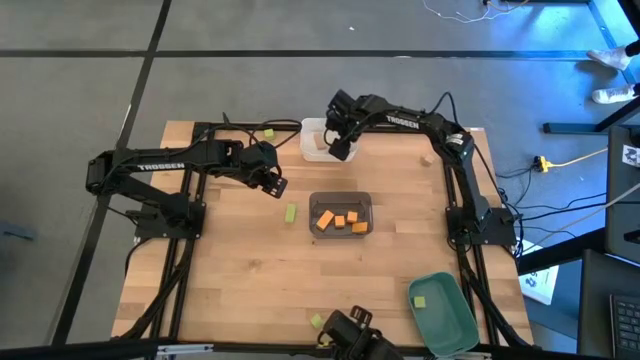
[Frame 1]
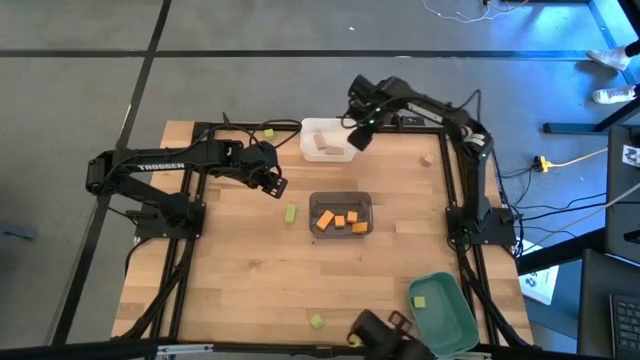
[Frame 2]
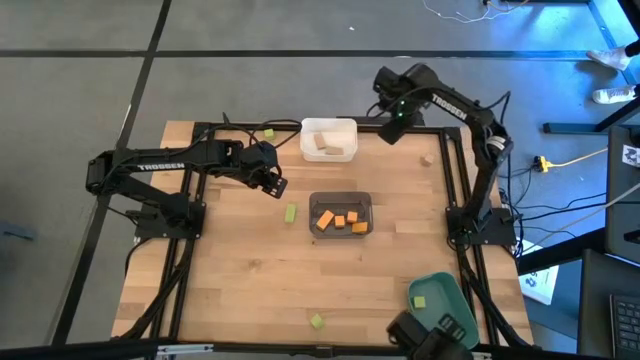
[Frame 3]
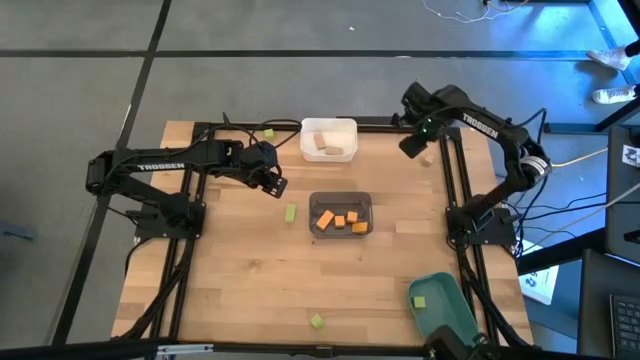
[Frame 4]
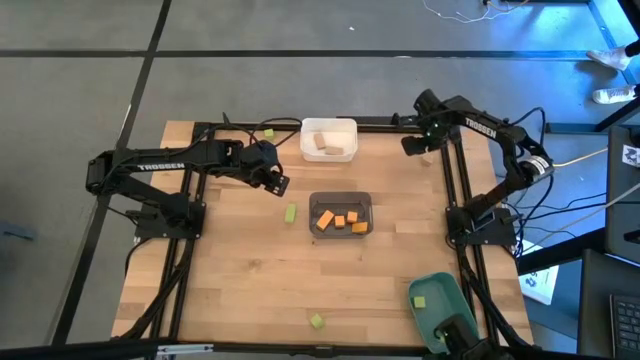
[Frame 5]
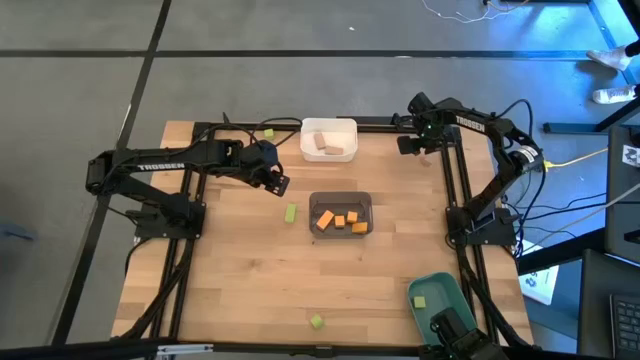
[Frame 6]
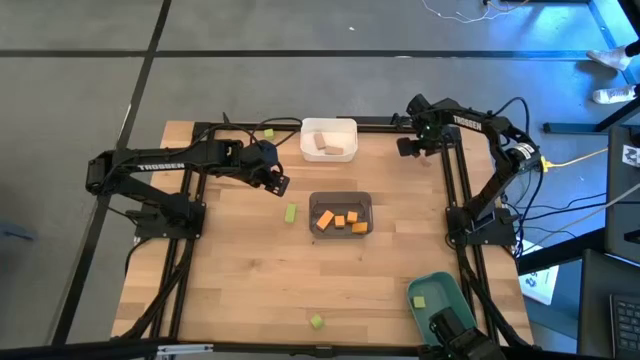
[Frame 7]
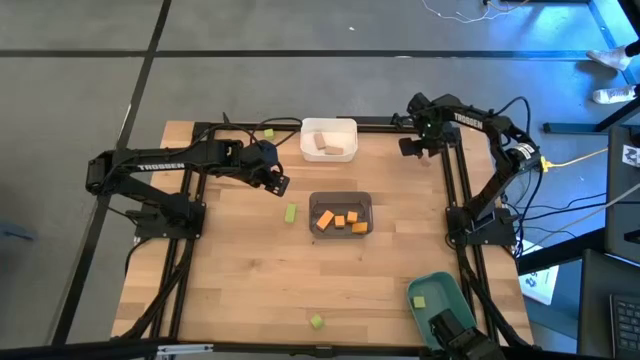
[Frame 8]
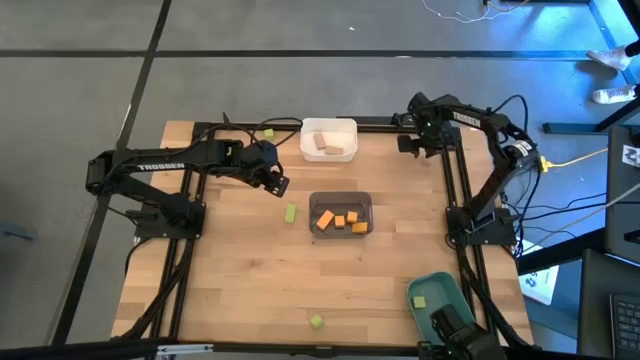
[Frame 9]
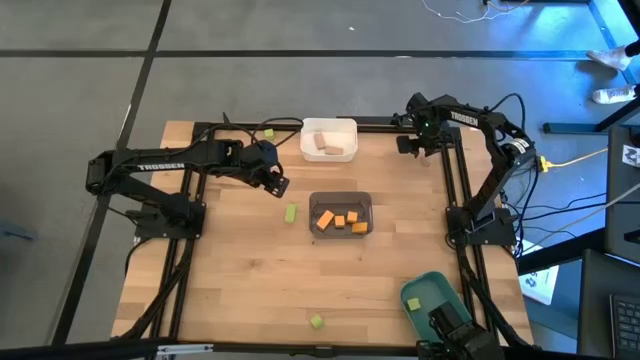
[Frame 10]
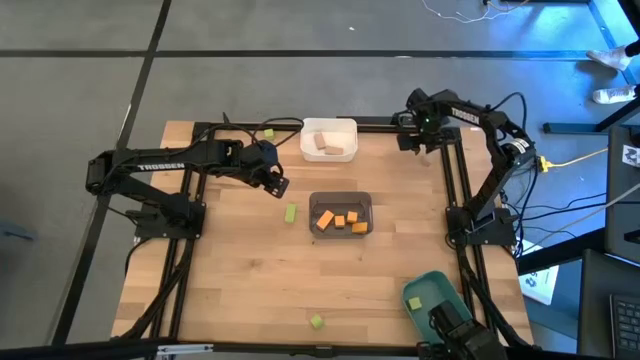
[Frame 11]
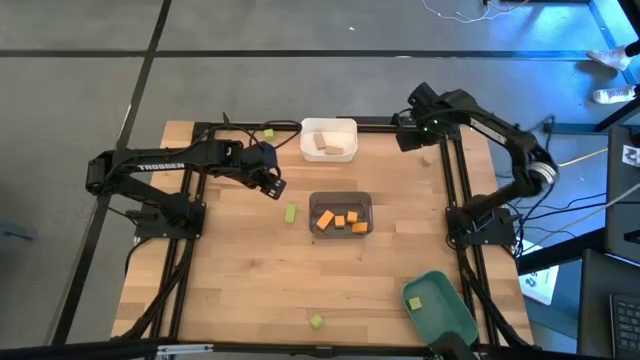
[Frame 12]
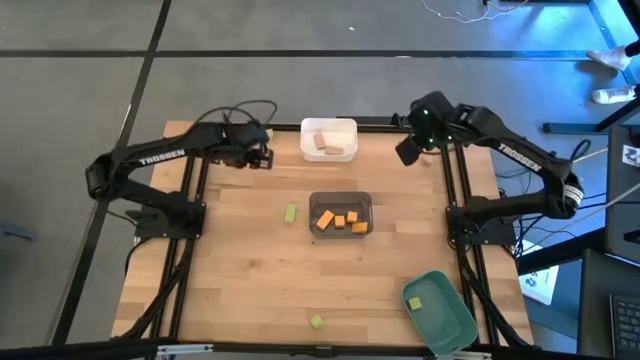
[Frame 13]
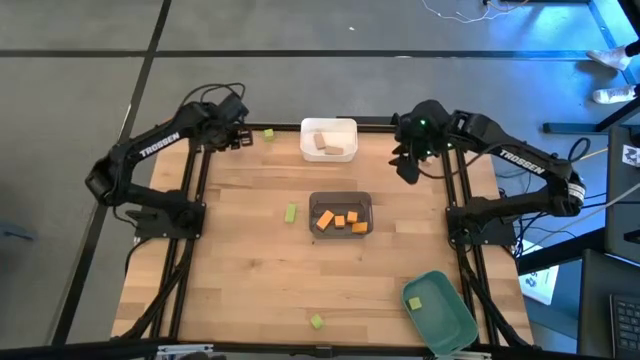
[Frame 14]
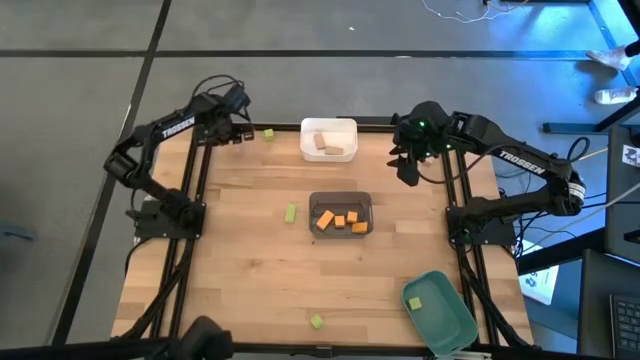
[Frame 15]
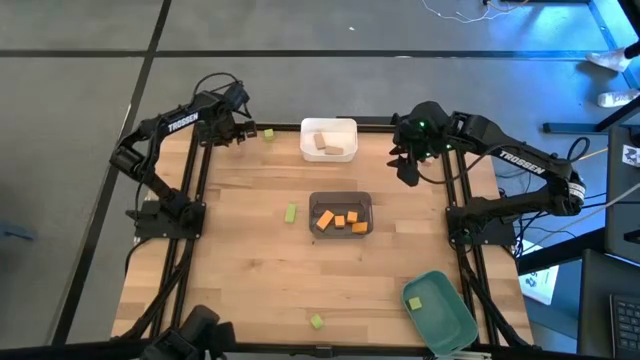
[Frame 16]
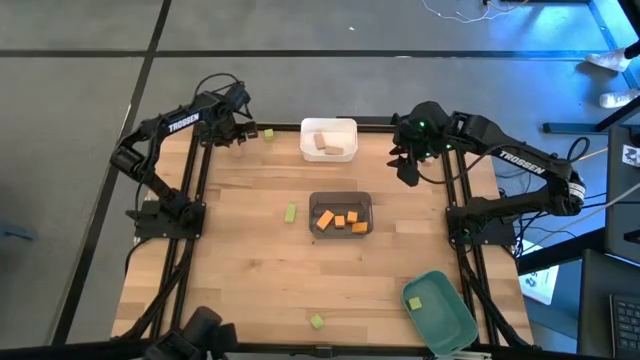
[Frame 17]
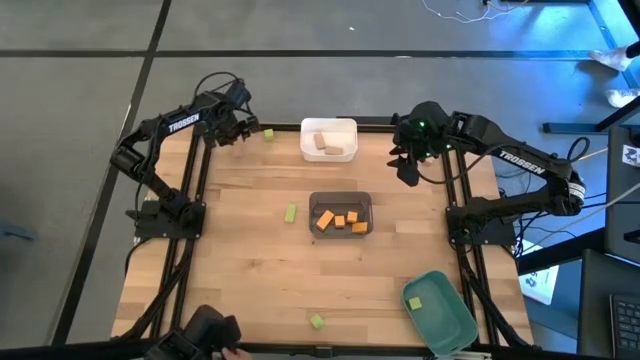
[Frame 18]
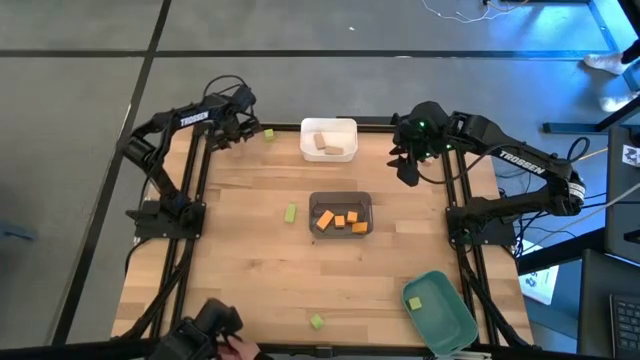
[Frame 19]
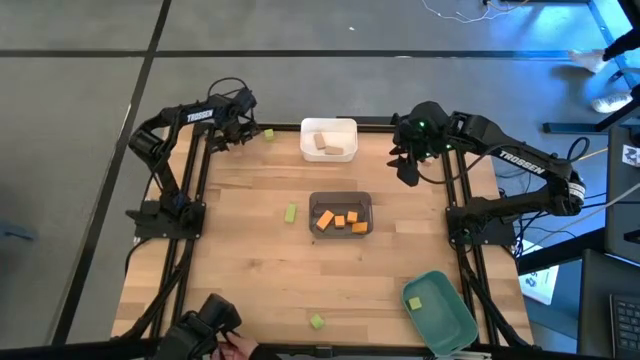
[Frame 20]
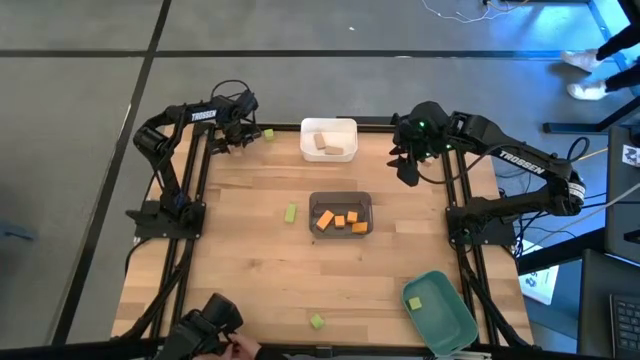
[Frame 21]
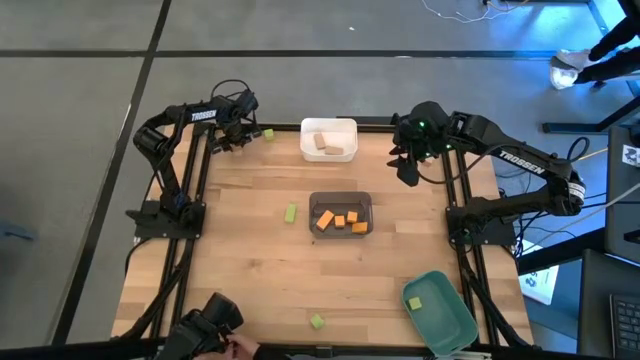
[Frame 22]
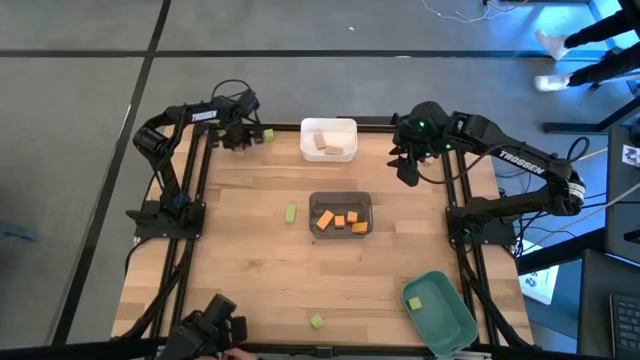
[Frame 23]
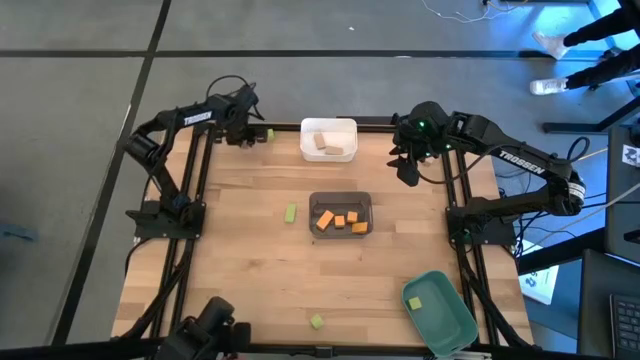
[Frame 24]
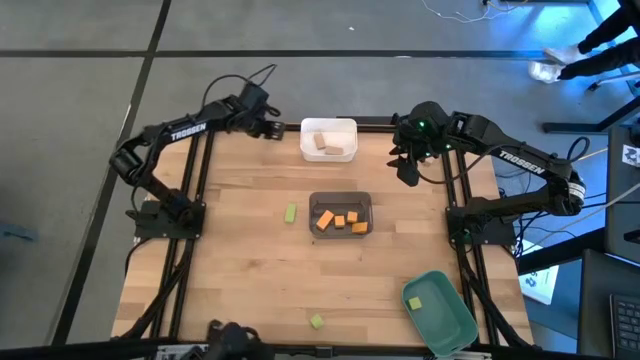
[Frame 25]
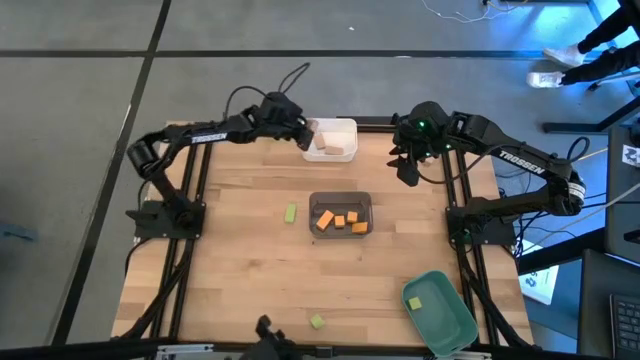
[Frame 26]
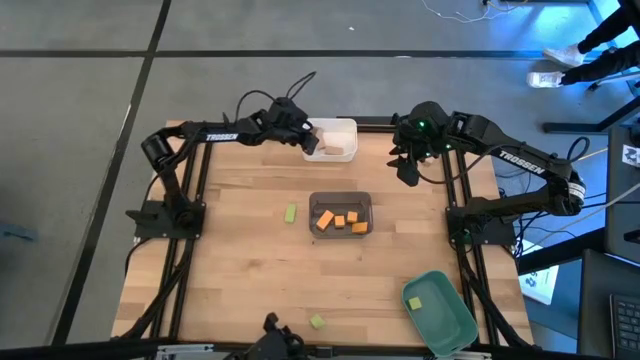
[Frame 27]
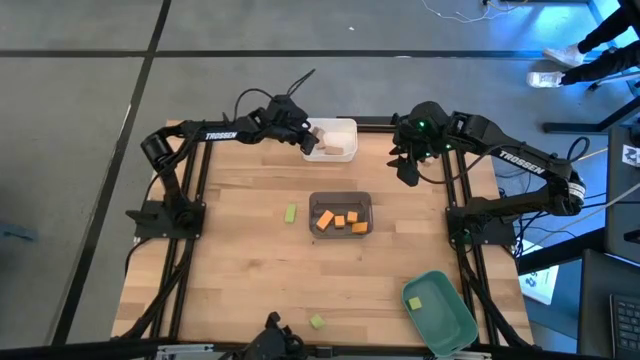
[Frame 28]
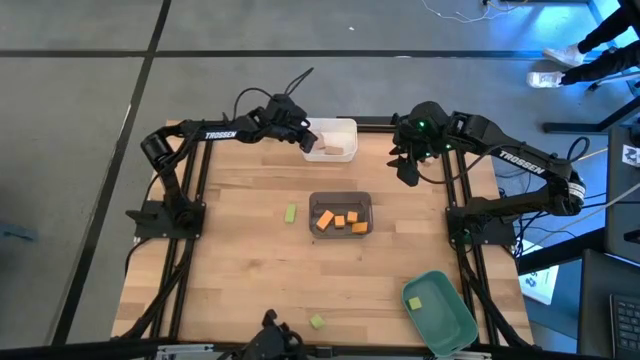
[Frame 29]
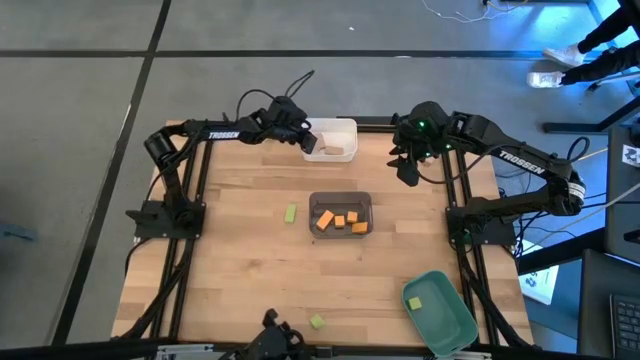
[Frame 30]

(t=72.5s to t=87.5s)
Task: Sort & place blocks by color
Put the brown block into the white bin

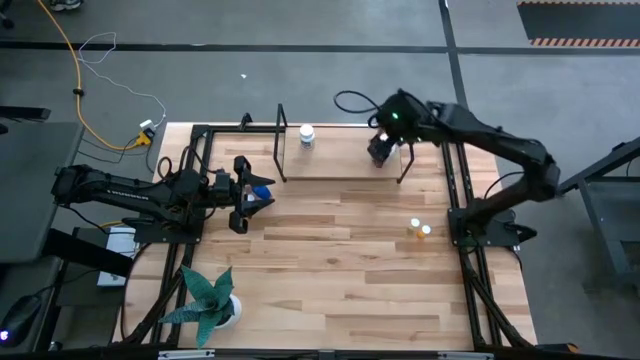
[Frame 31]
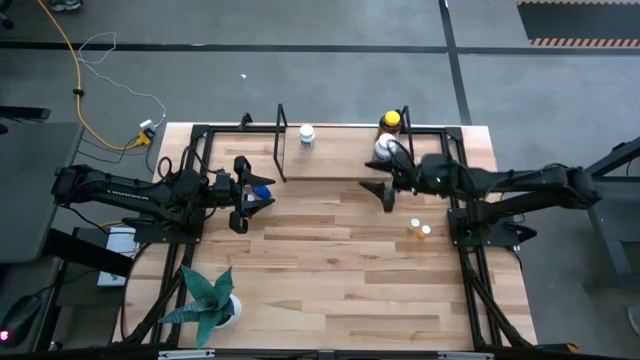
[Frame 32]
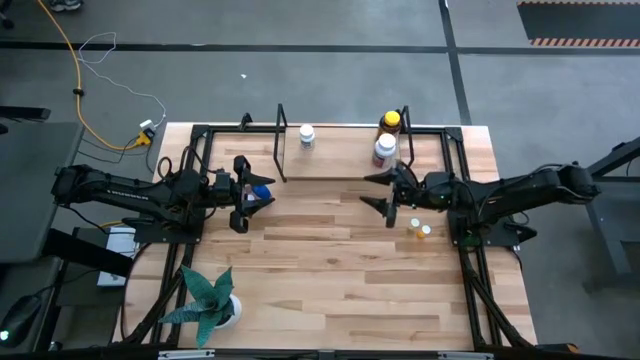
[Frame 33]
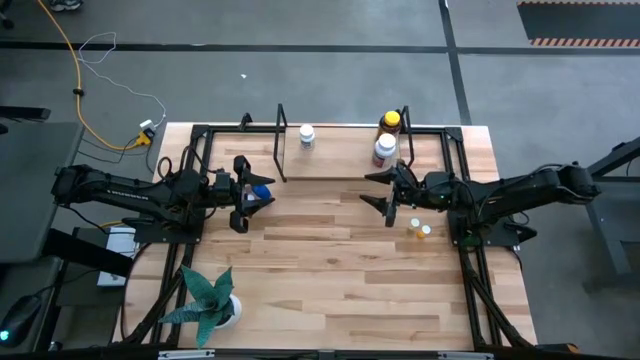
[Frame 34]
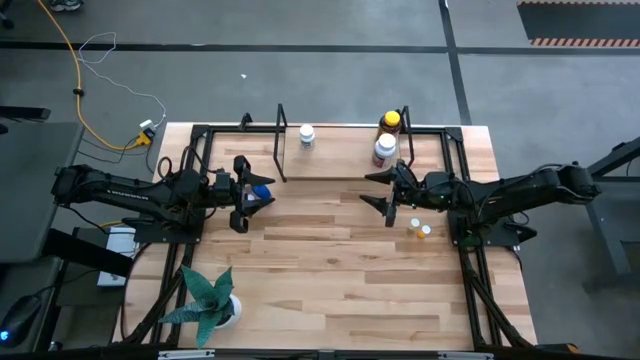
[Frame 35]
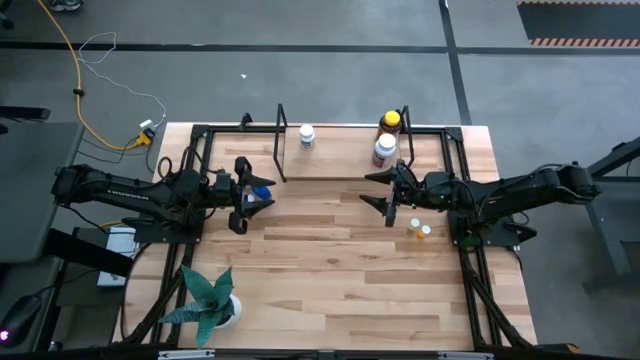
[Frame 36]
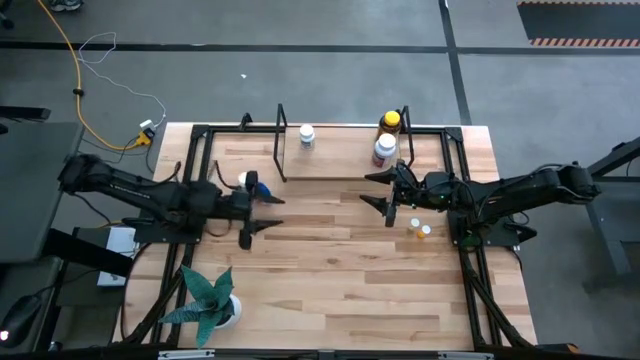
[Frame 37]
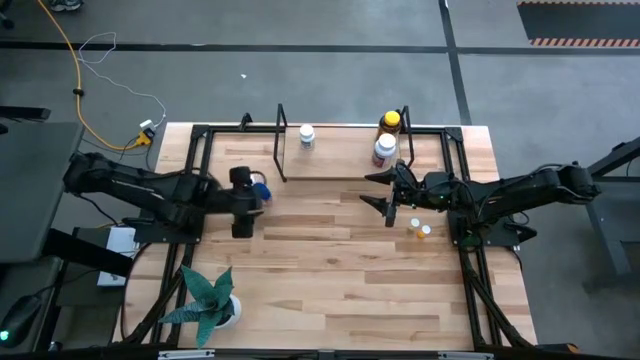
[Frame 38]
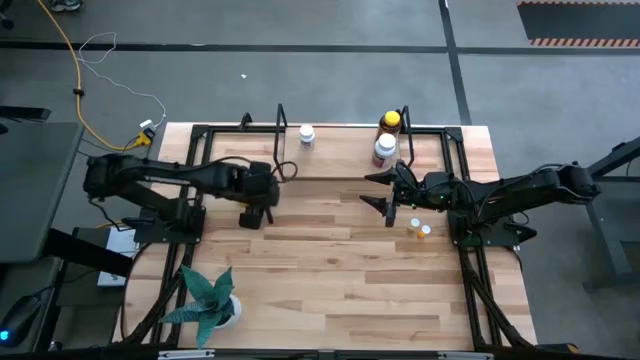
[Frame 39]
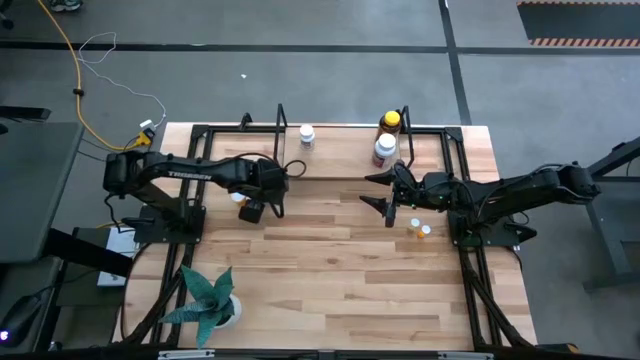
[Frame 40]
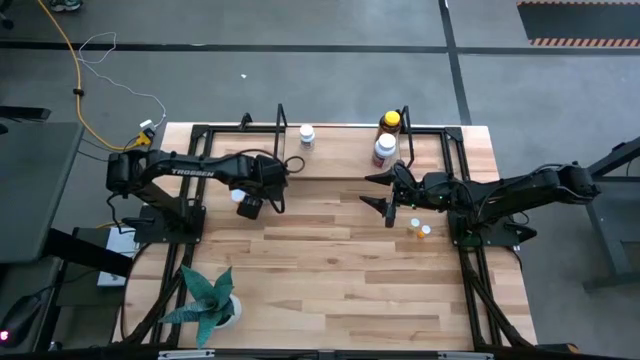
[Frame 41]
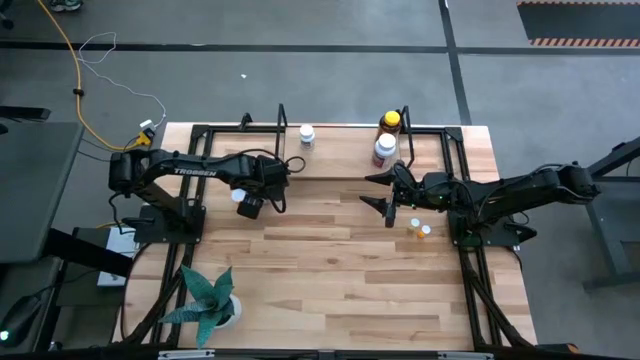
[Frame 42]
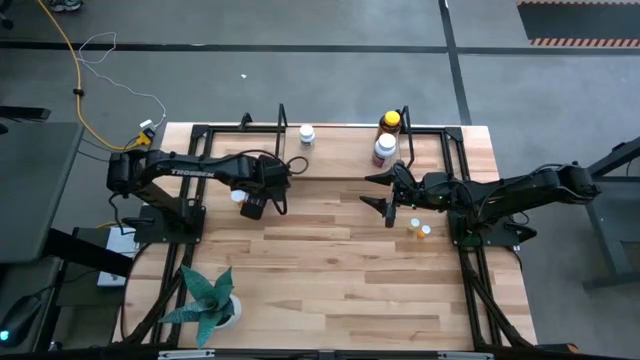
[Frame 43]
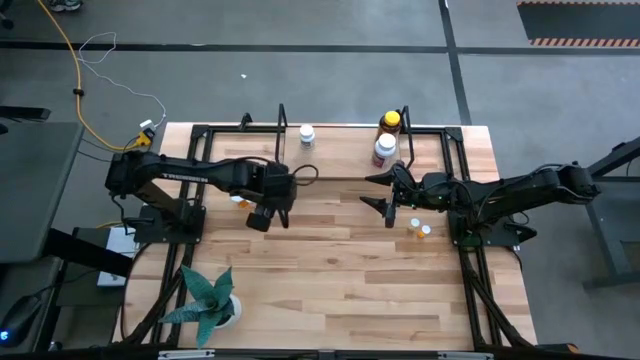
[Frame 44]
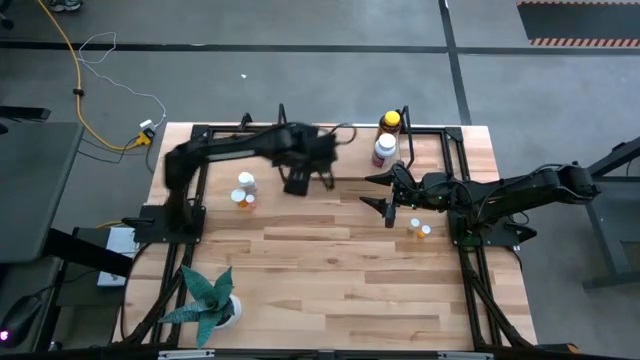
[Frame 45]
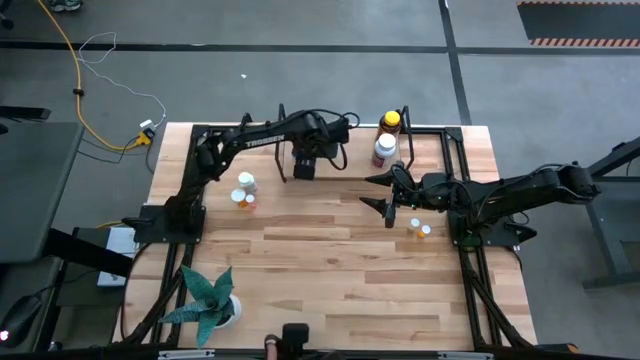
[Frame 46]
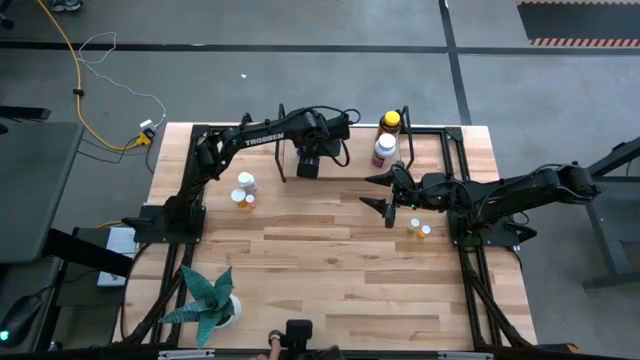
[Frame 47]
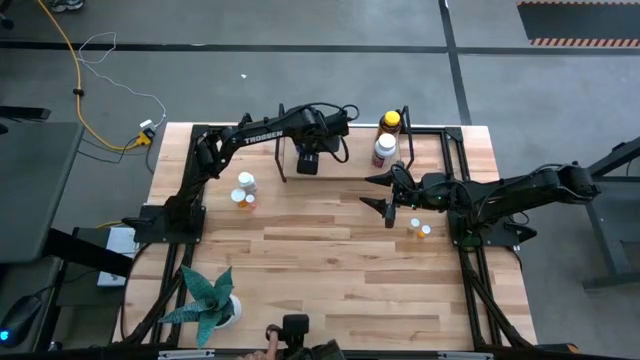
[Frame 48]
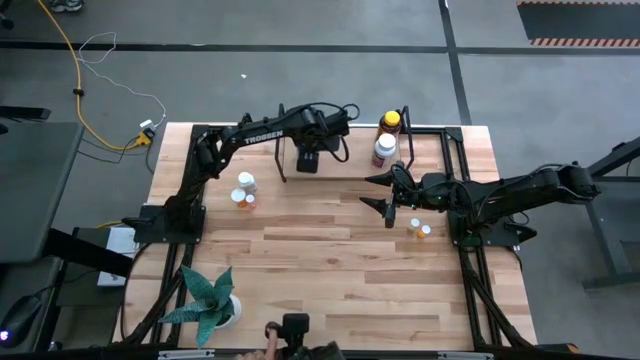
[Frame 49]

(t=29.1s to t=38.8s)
Task: Pick and place medicine bottles onto shelf by color
Put the large blue pill bottle on the shelf
